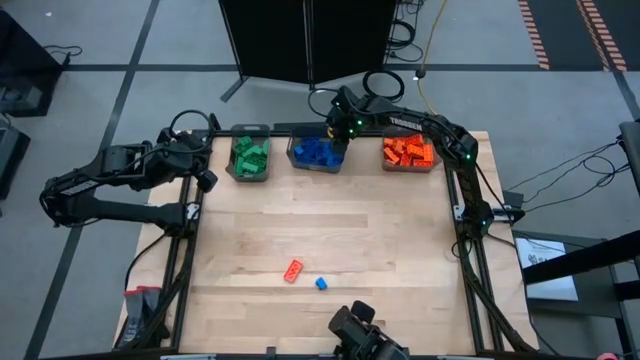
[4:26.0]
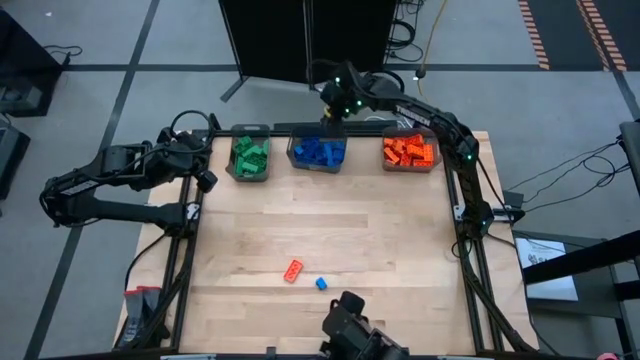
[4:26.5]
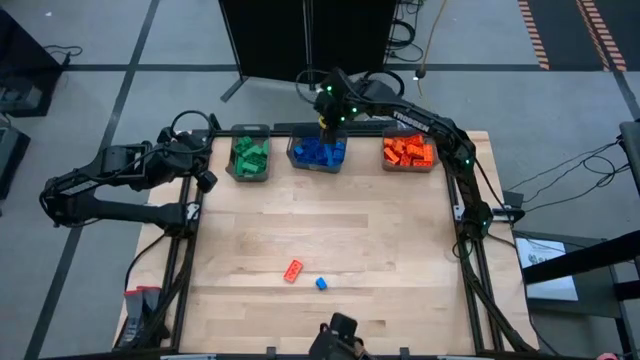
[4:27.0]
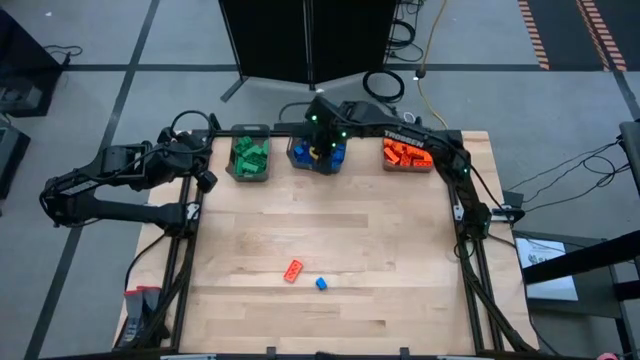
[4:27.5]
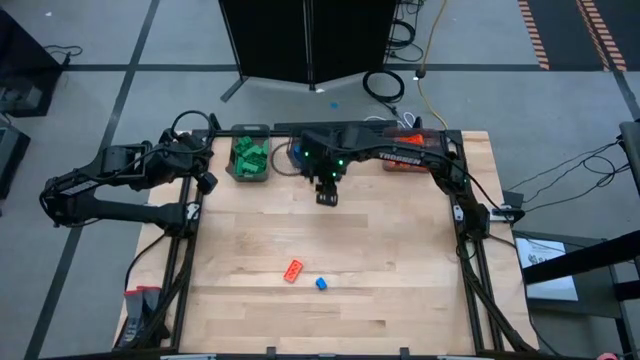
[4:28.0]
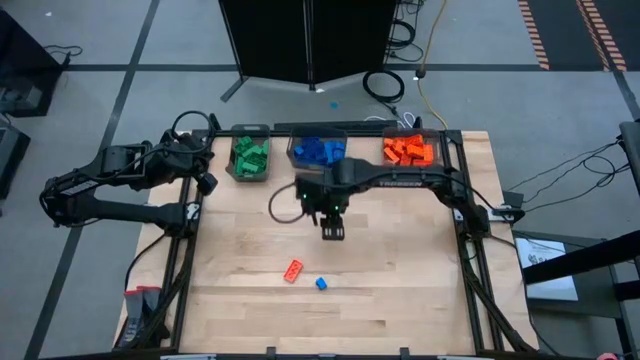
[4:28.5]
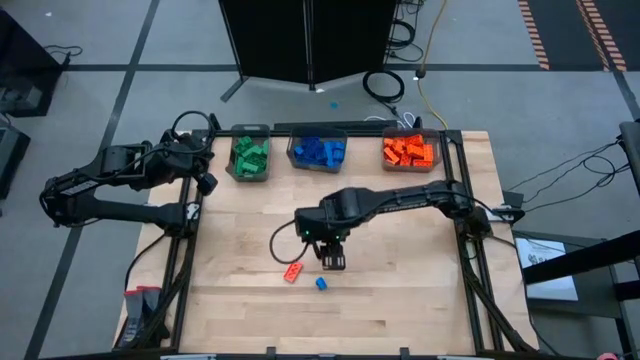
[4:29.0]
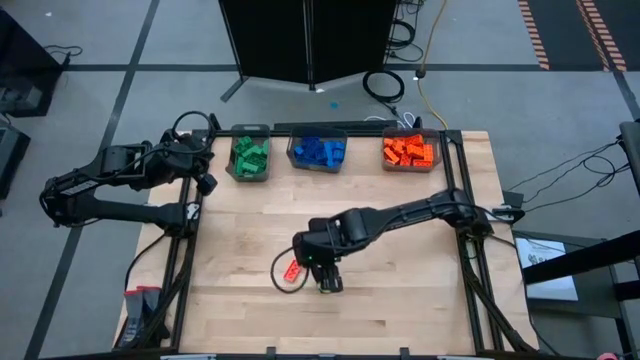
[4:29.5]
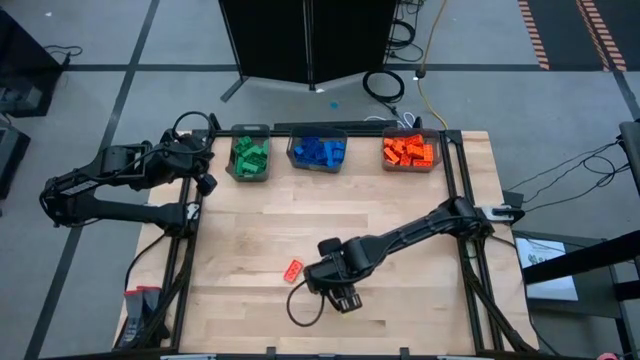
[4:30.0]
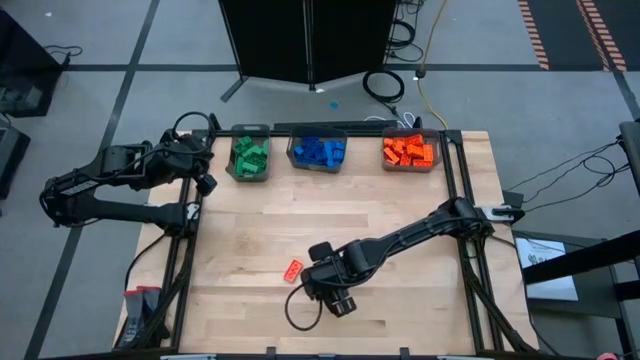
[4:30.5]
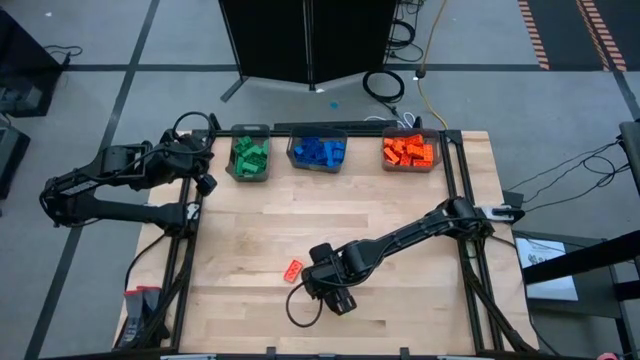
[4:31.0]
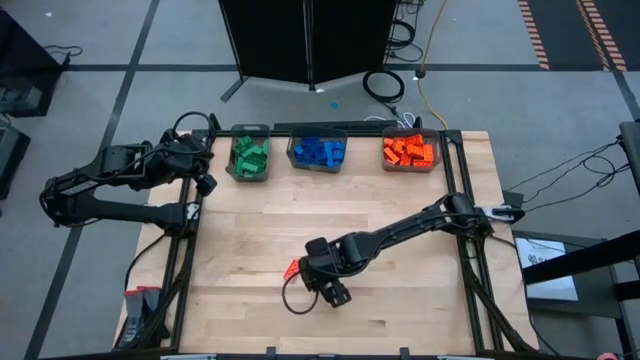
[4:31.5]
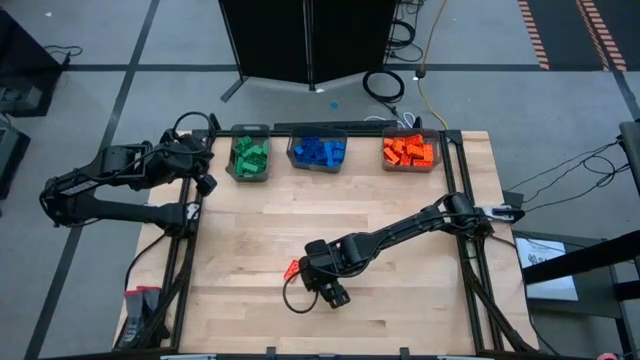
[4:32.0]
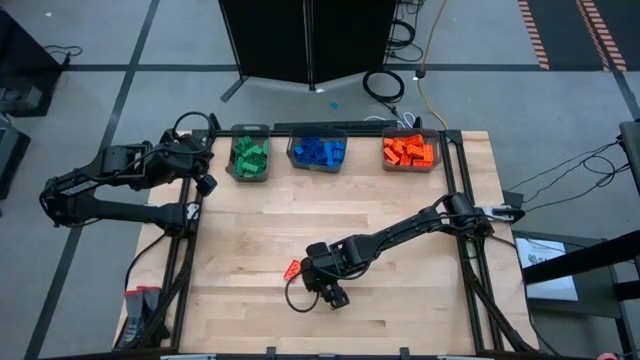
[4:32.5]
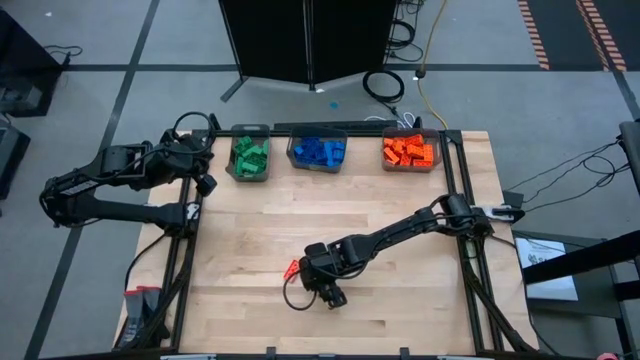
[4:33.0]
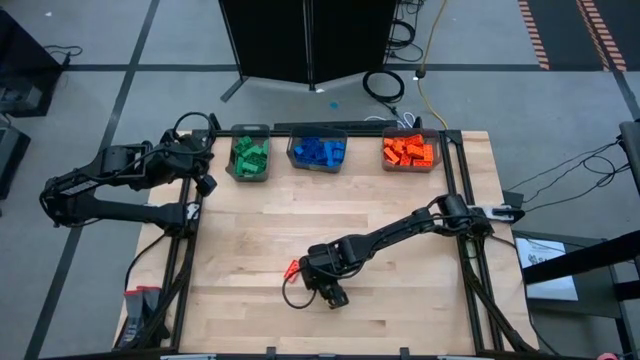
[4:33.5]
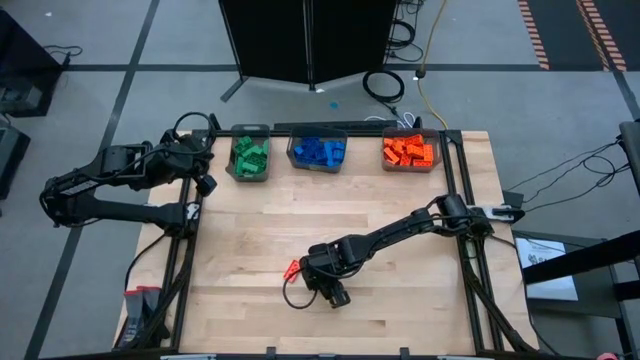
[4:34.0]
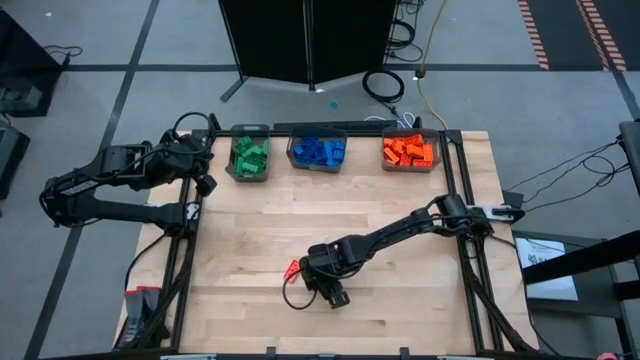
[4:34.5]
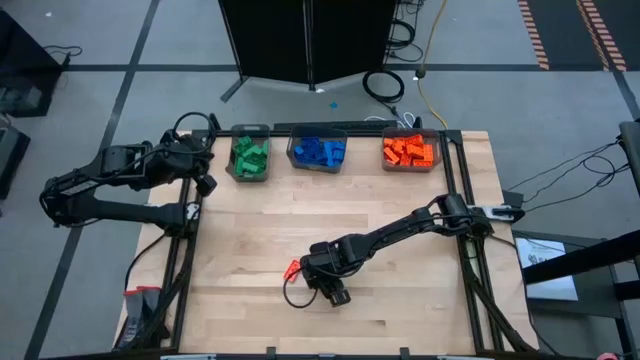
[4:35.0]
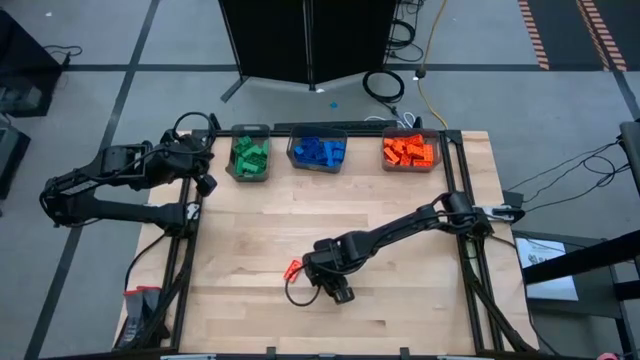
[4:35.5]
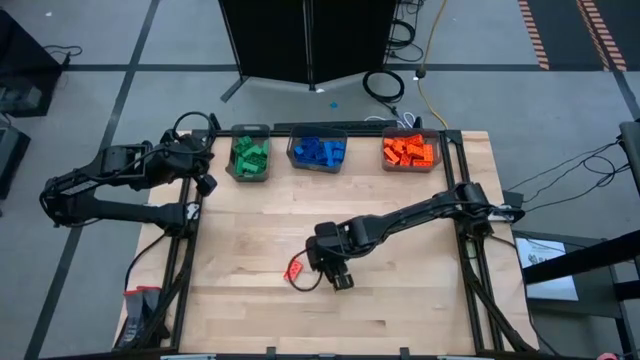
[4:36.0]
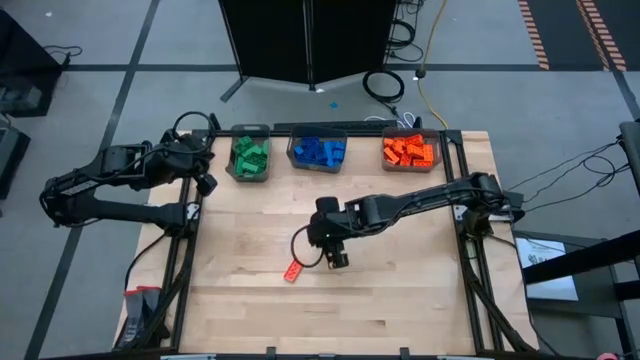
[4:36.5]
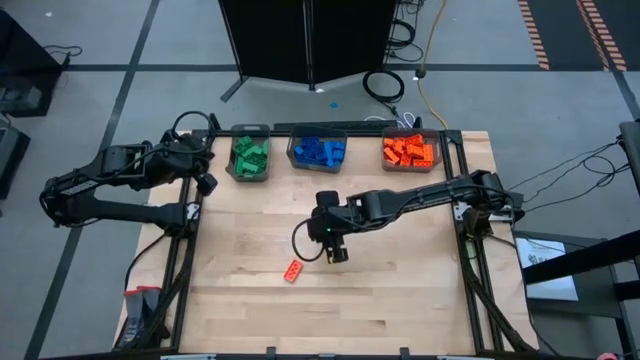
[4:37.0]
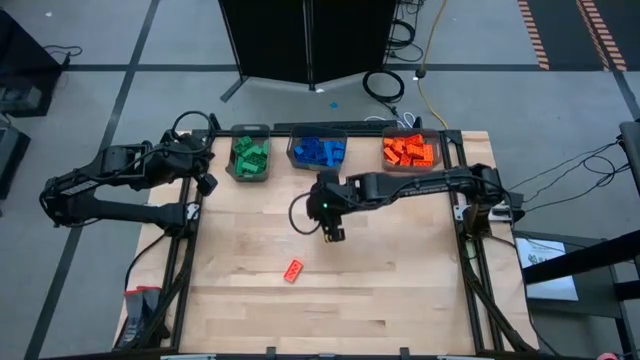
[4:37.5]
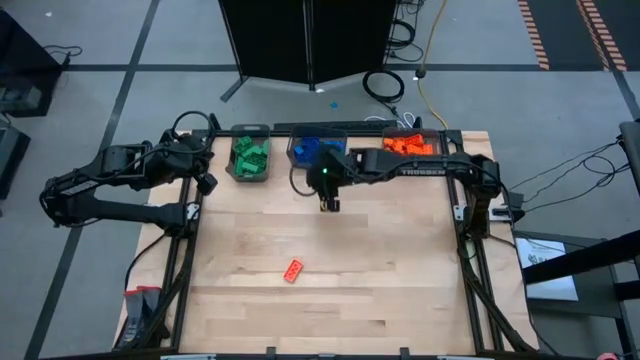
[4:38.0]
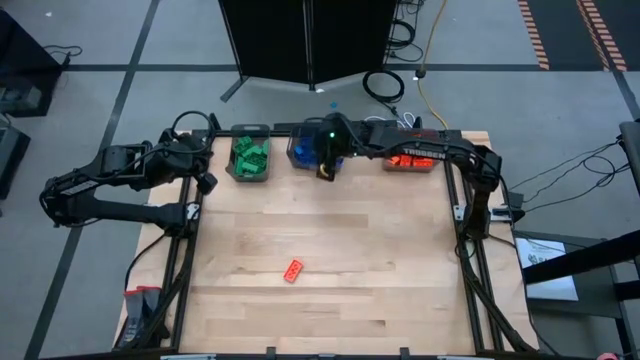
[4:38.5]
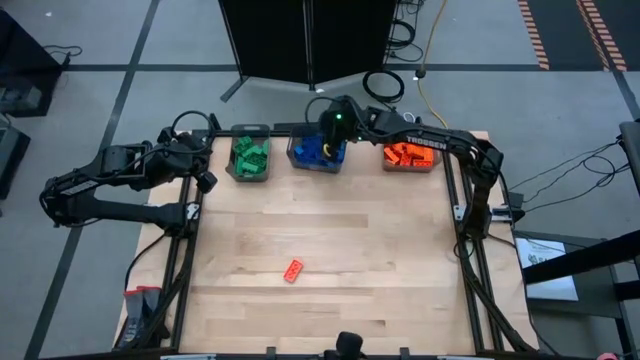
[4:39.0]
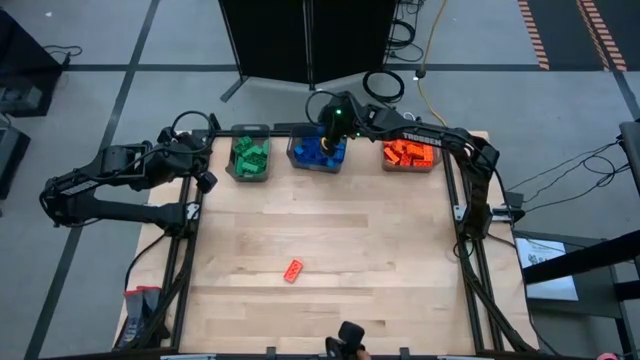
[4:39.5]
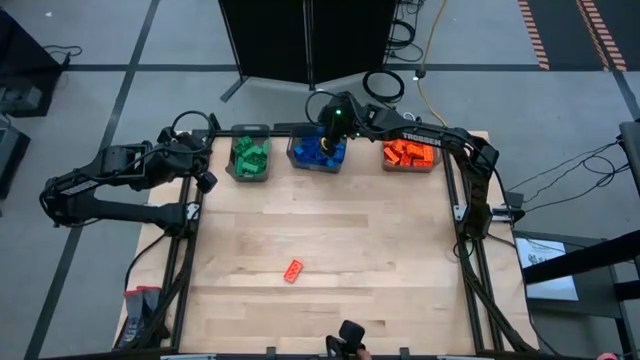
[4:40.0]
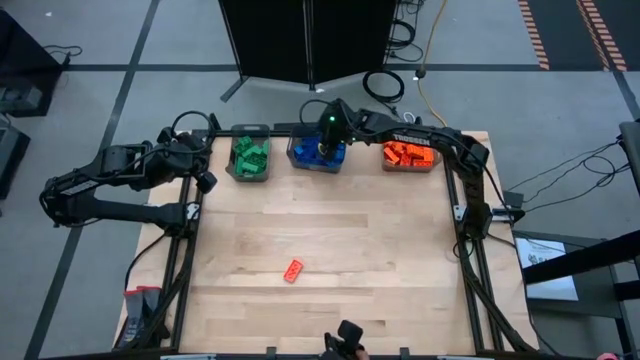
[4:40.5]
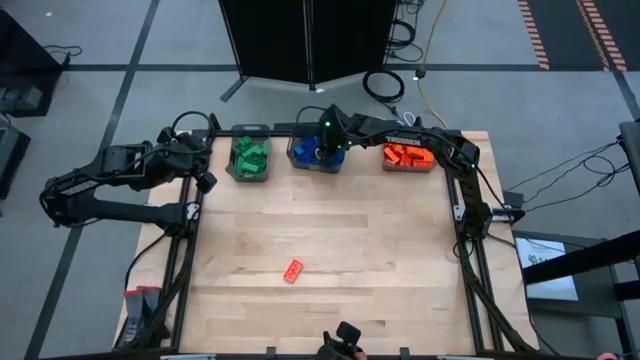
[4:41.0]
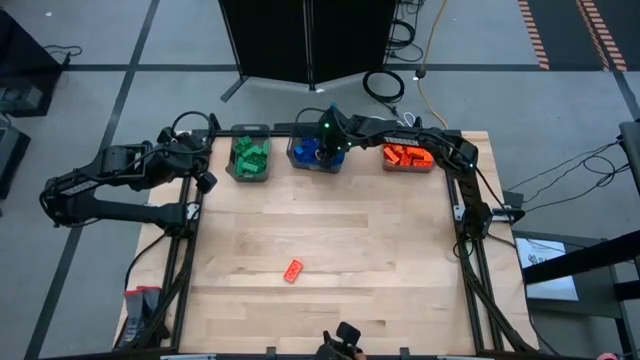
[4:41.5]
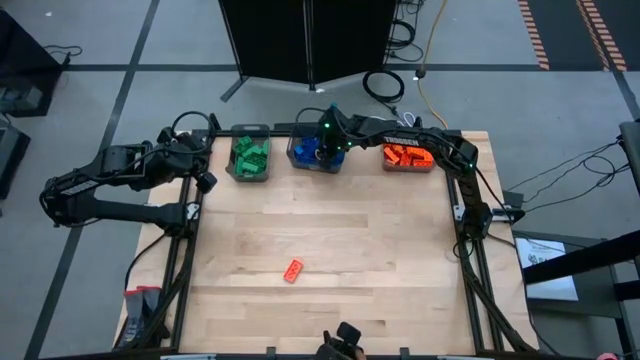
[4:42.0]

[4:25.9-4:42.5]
Task: Sort blocks
Put the blue game piece into the middle black bin

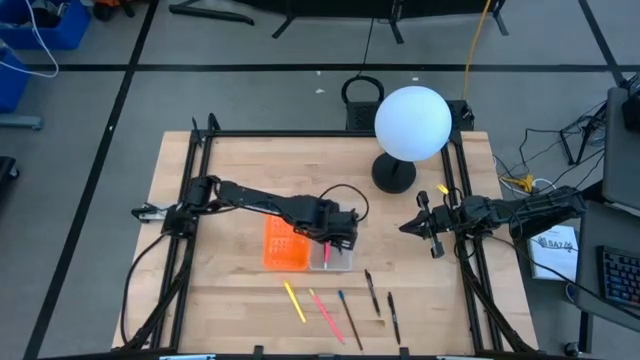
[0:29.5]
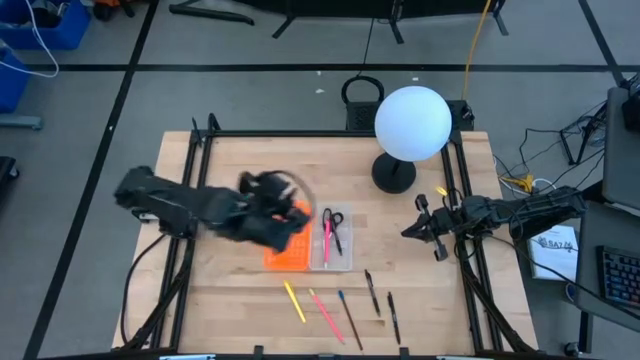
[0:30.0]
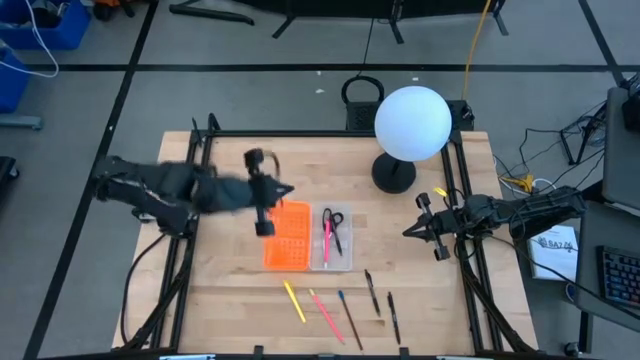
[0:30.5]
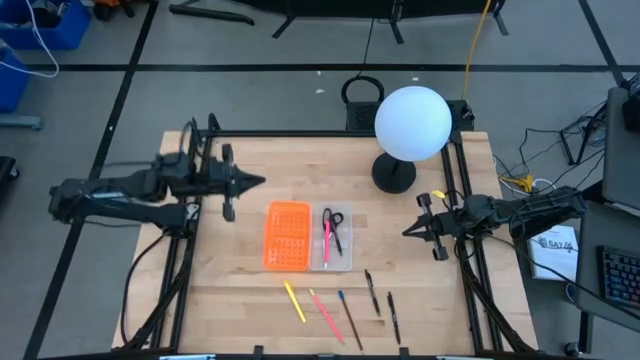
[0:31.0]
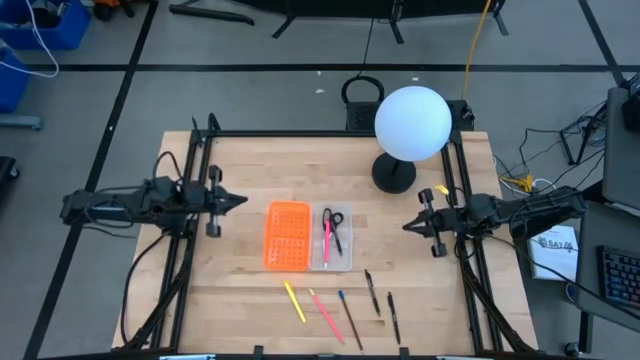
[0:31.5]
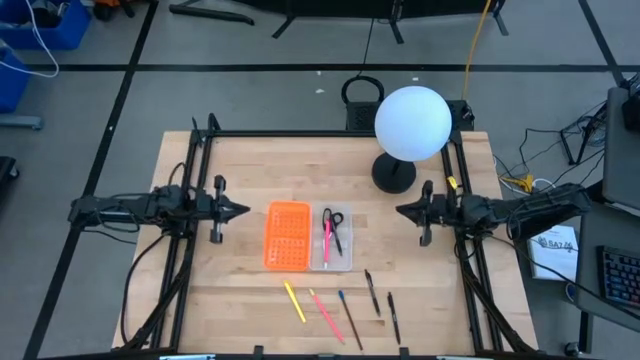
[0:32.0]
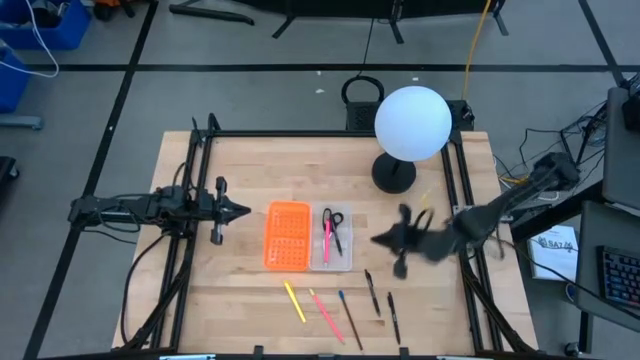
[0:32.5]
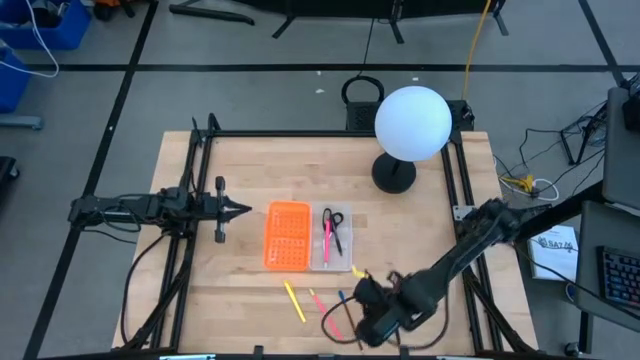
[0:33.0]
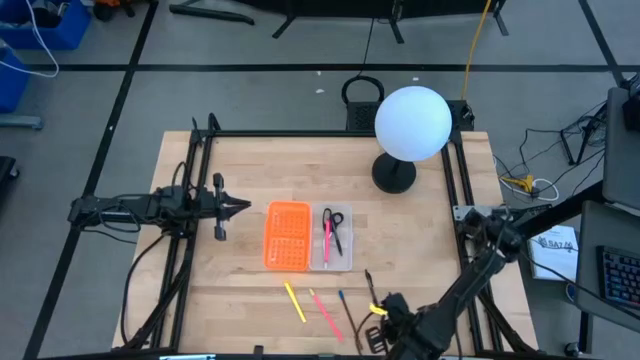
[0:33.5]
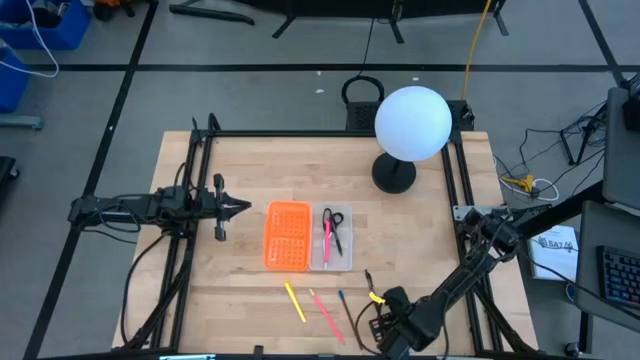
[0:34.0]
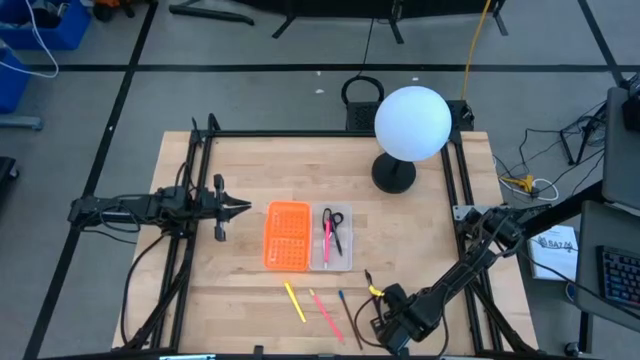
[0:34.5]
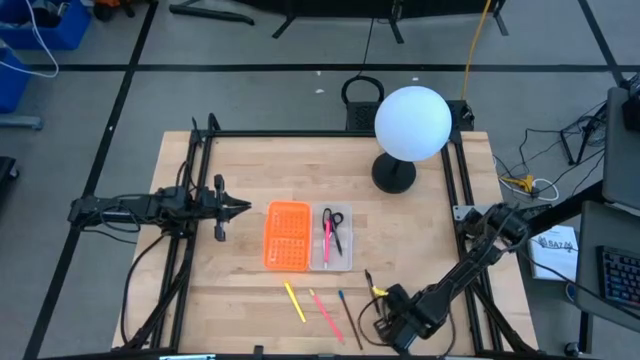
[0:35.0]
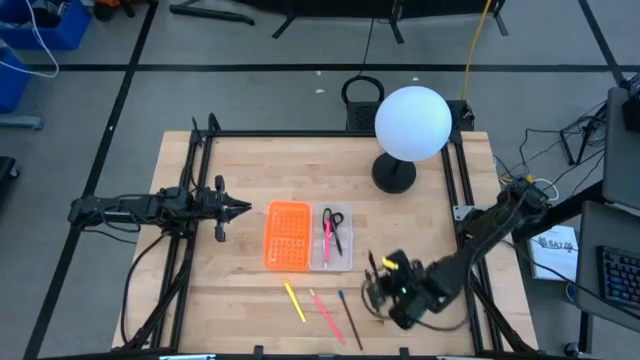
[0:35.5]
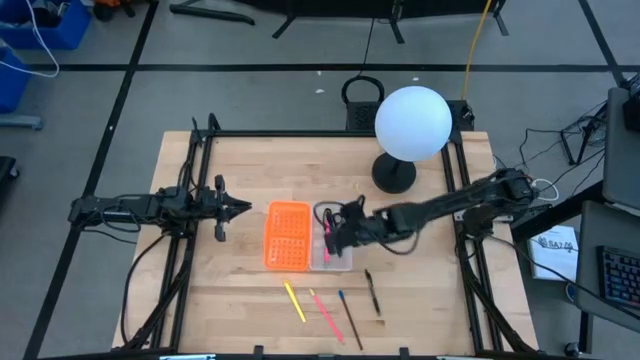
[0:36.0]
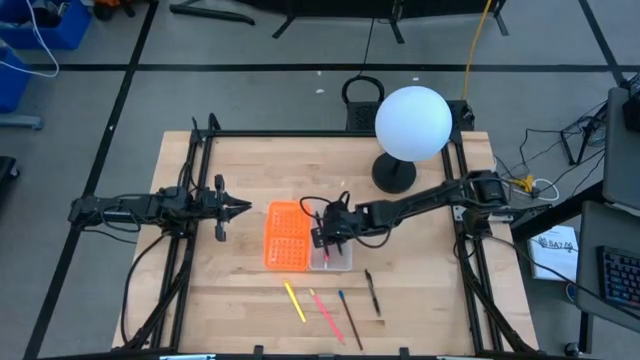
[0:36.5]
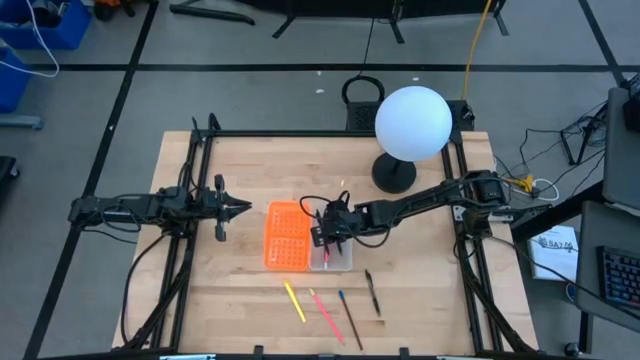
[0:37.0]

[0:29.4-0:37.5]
Task: Pick & place school supplies into a supply box
Put the black pen into the orange supply box
